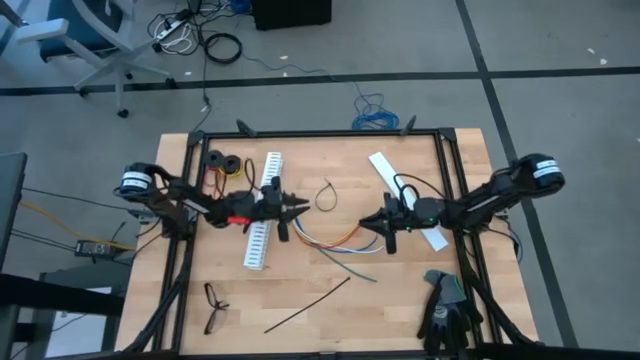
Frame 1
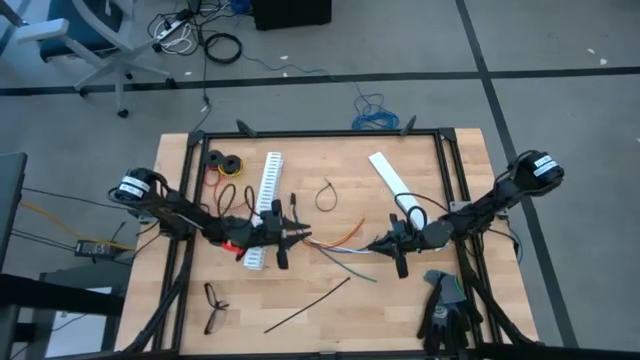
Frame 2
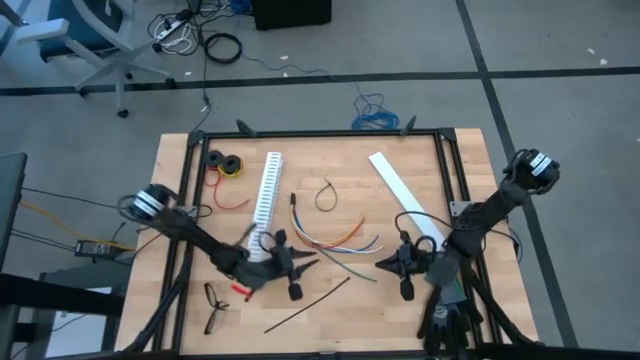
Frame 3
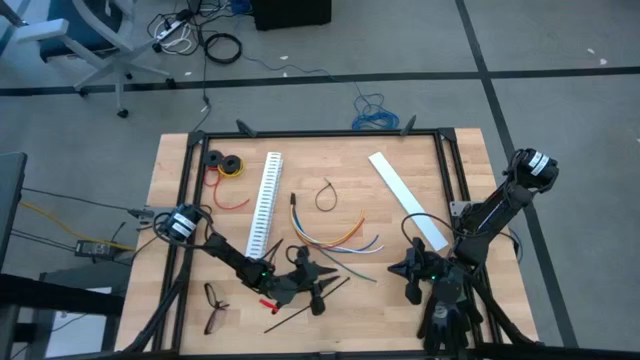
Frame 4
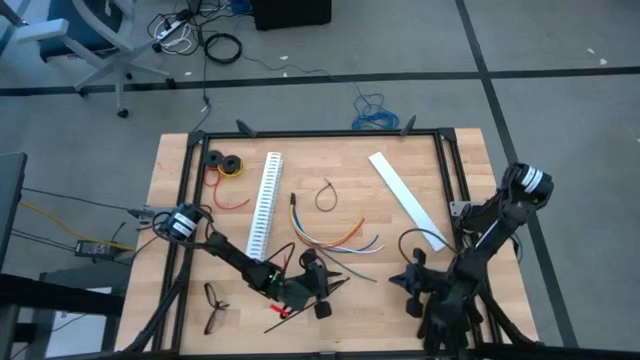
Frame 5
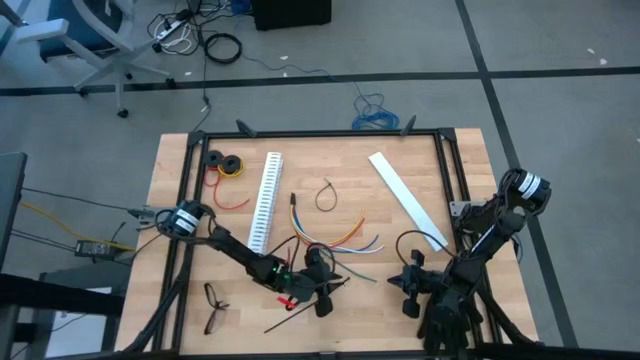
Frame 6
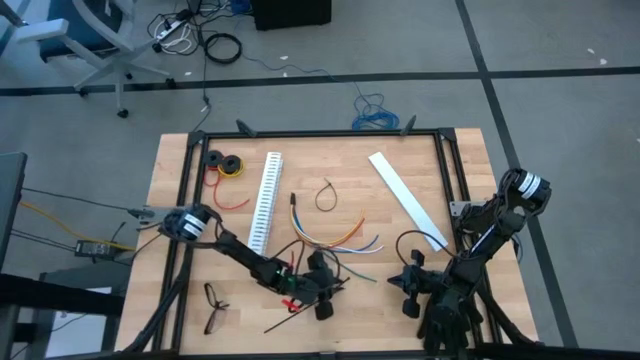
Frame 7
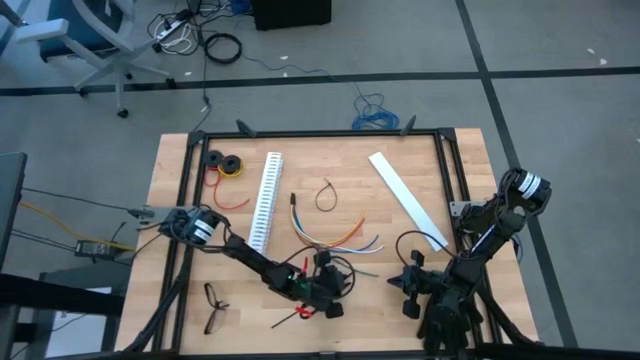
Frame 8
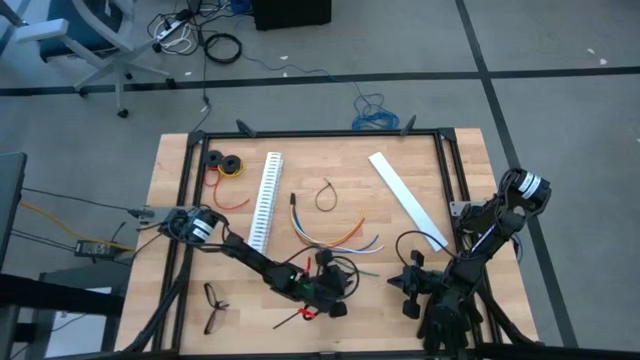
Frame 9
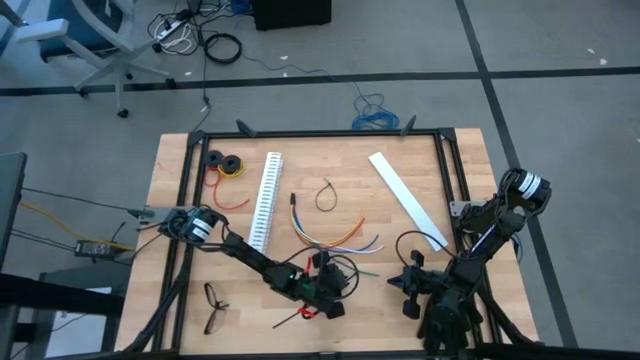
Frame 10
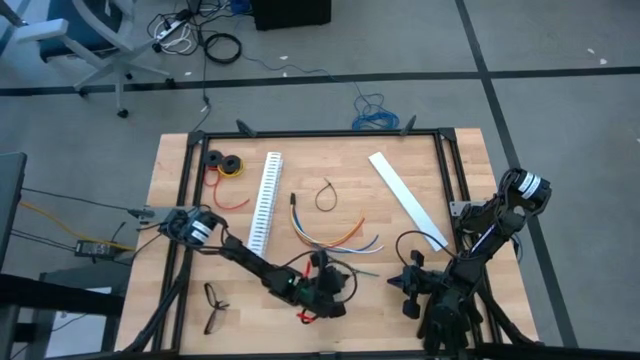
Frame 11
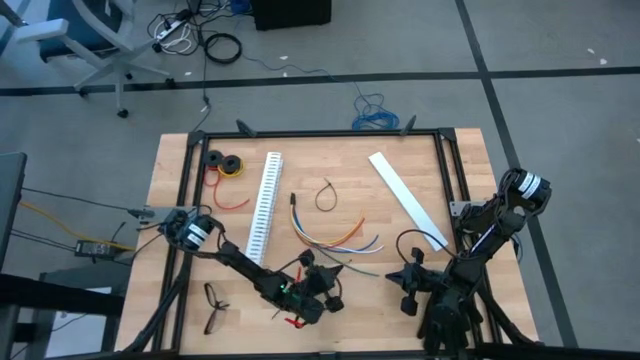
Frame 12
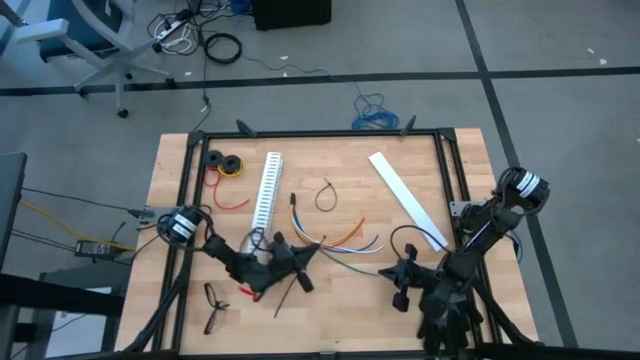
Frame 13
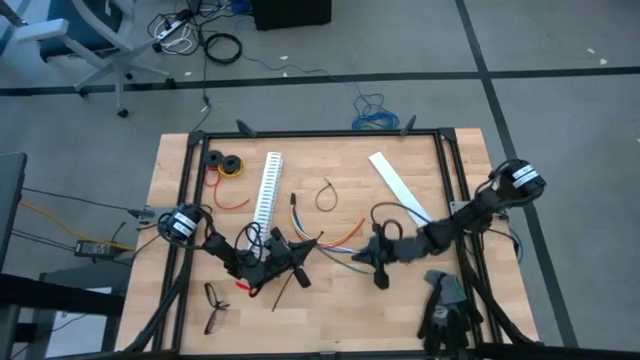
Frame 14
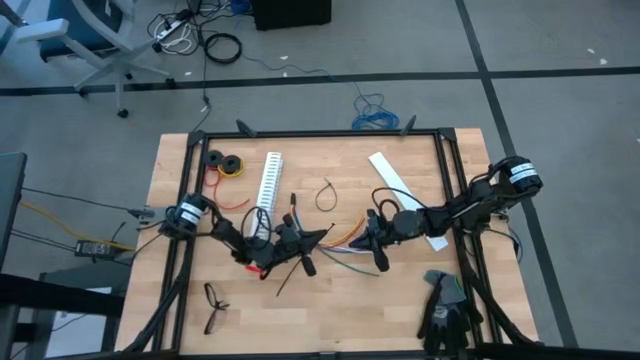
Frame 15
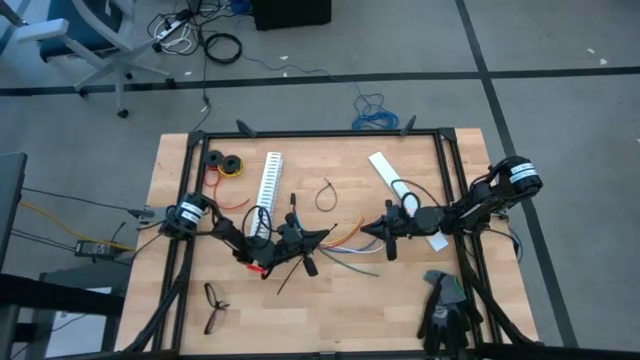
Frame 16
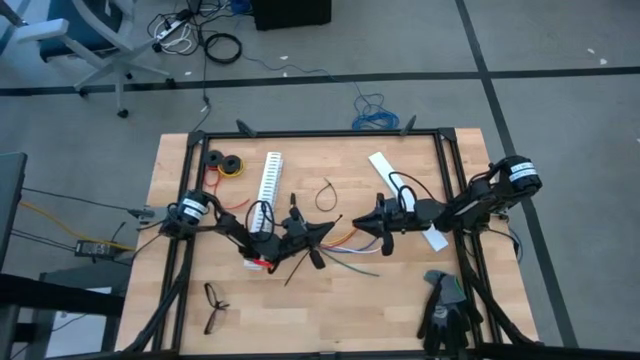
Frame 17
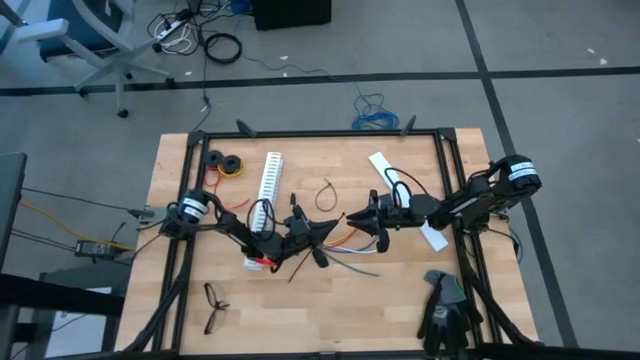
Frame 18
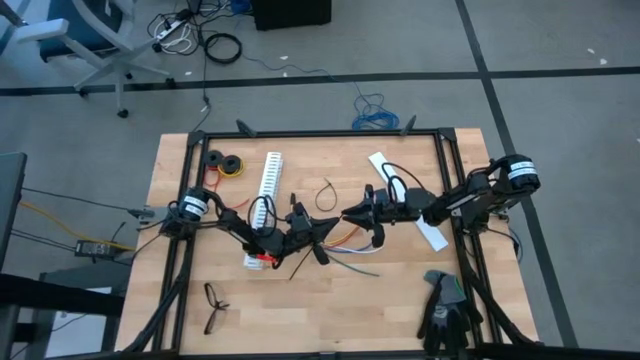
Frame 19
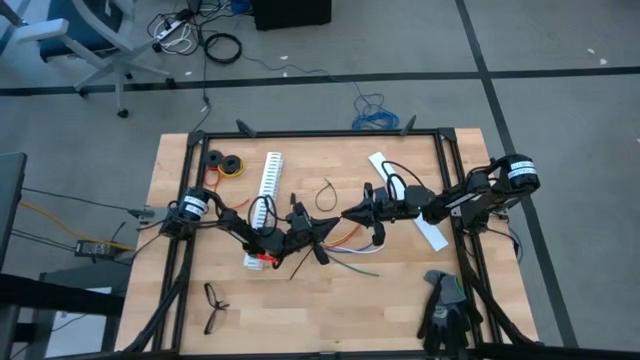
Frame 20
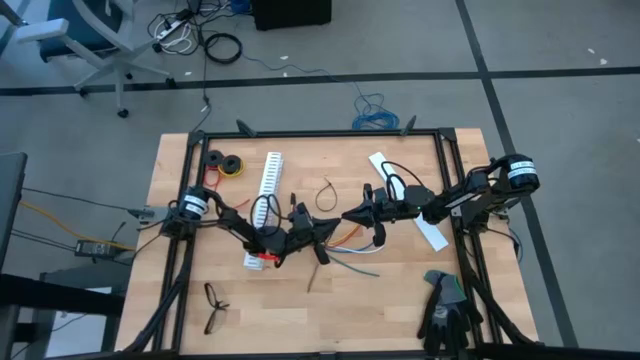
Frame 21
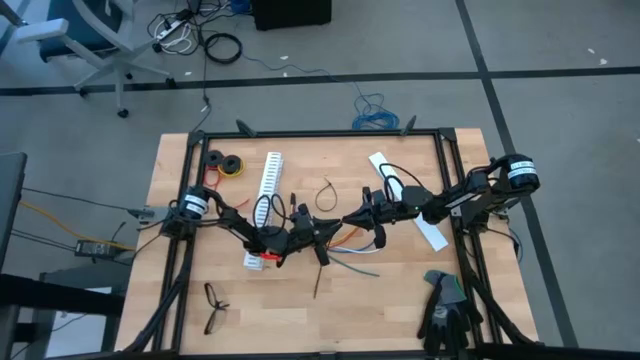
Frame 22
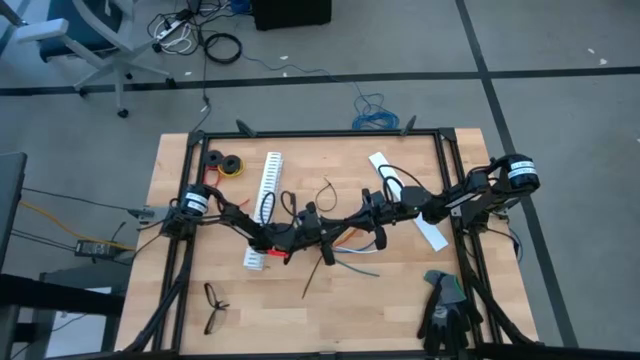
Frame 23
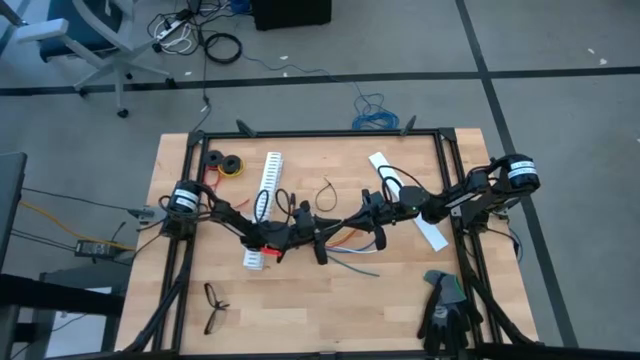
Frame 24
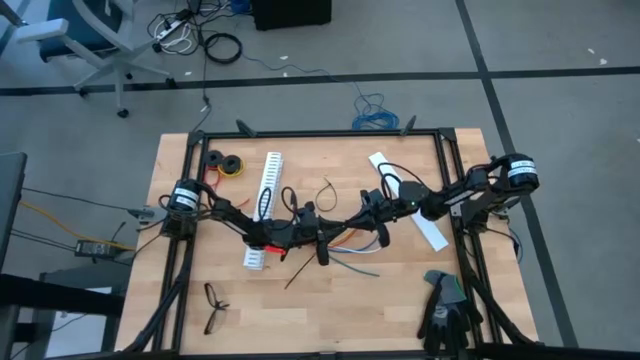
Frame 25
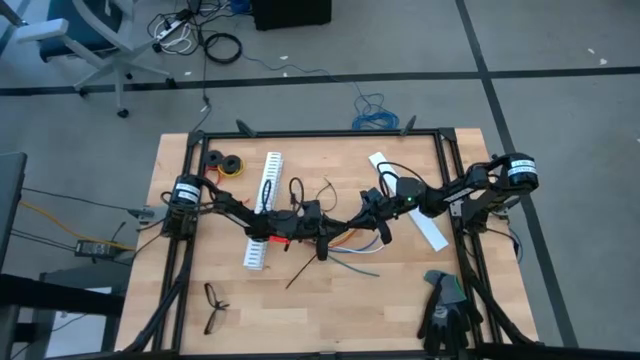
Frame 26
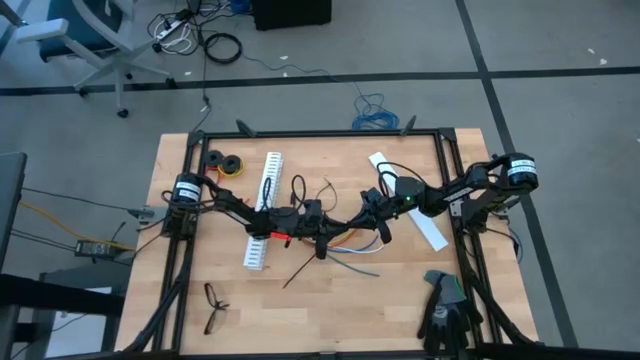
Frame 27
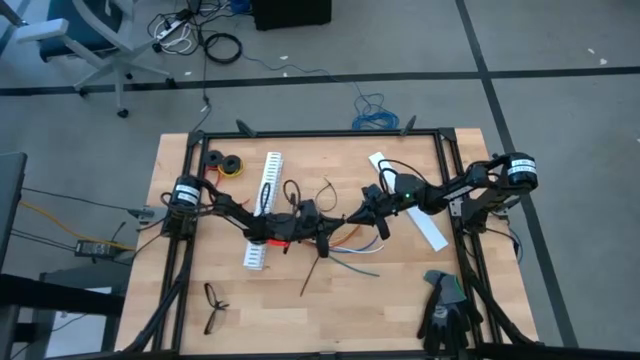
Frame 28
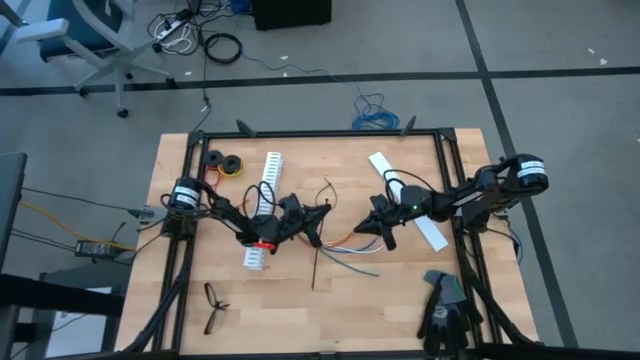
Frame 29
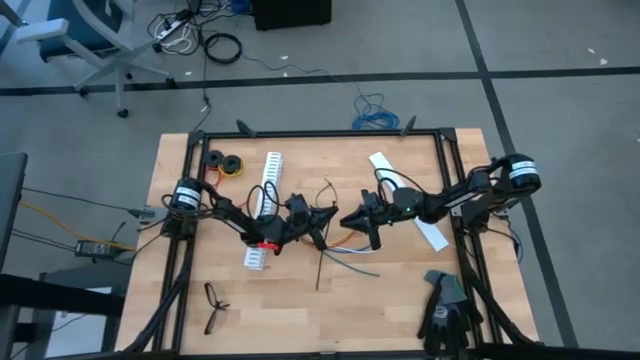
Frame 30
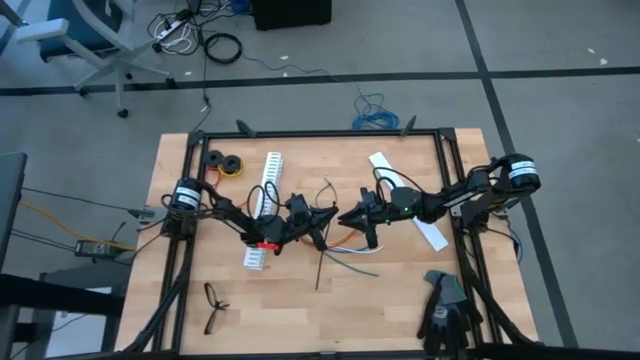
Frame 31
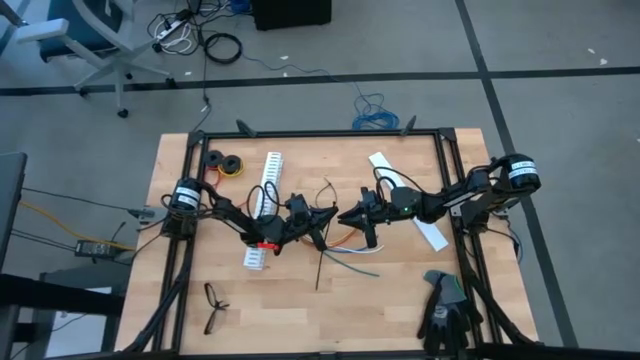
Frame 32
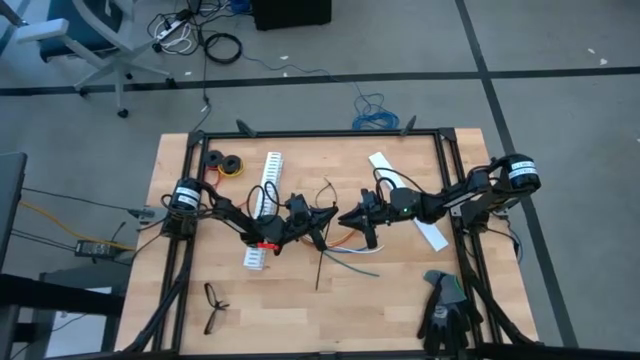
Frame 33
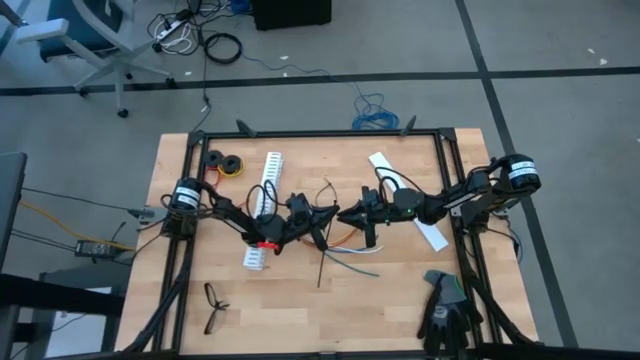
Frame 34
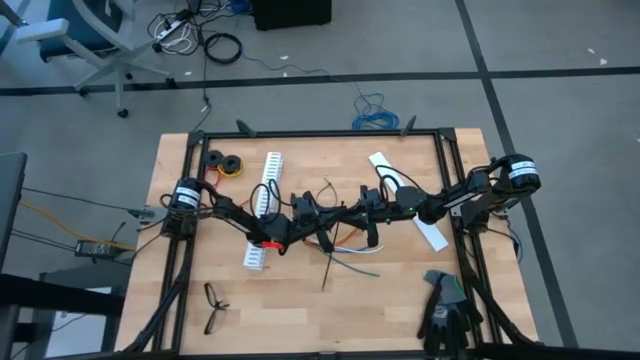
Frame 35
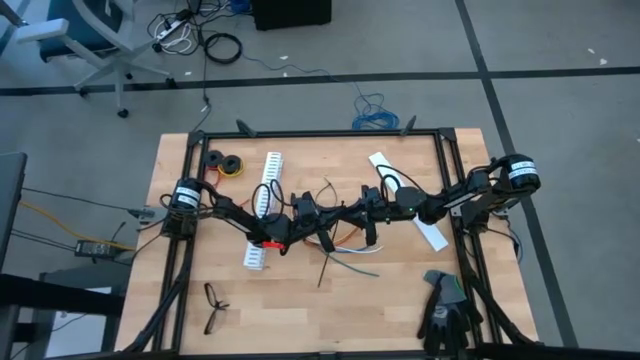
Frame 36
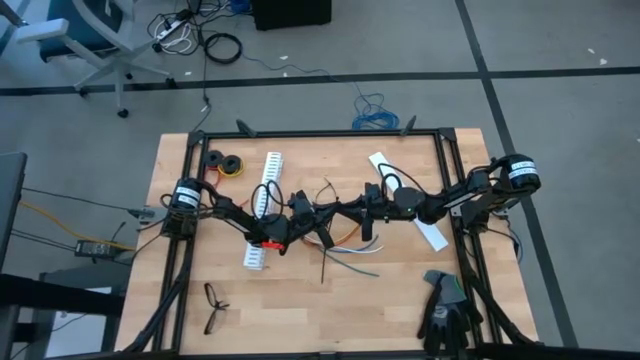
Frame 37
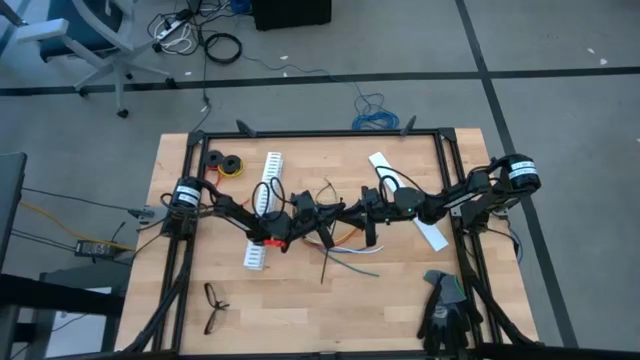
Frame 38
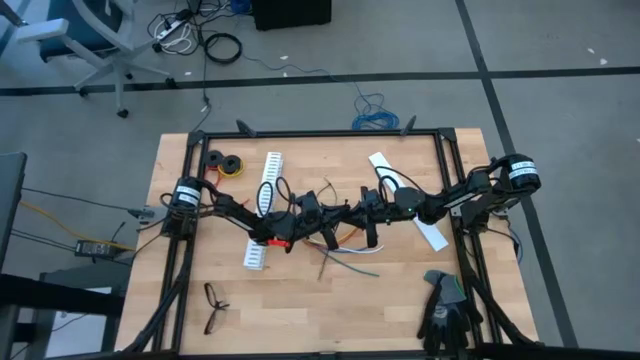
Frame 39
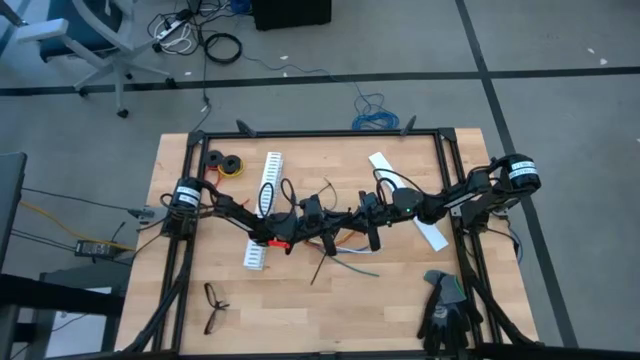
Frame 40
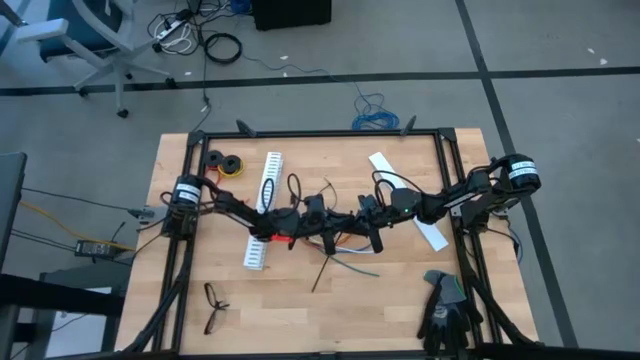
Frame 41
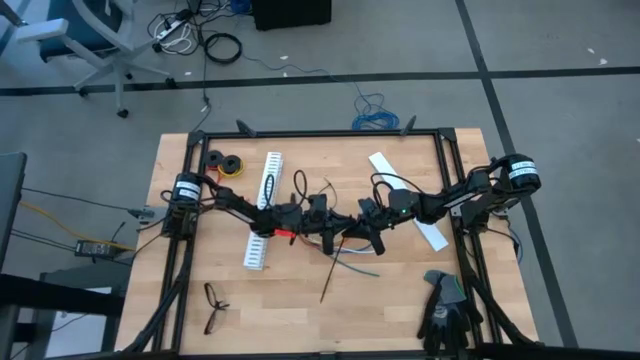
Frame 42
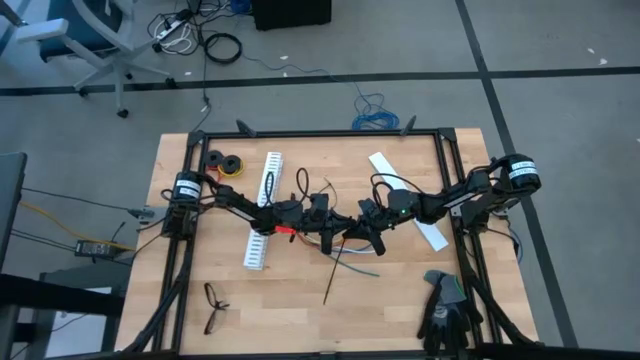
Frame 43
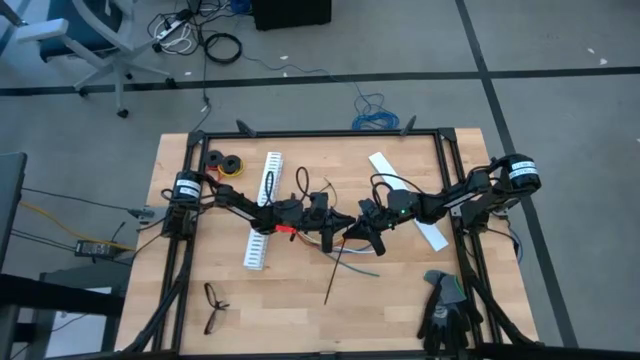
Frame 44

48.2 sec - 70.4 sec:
Task: Ziptie cables
Insert the black zip tie into the lock head
